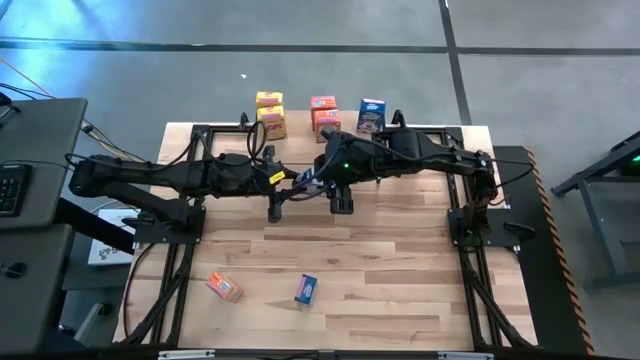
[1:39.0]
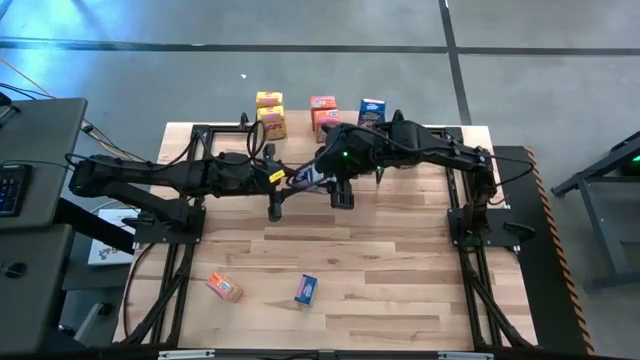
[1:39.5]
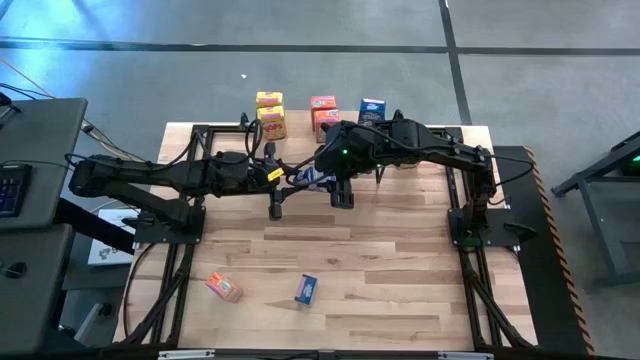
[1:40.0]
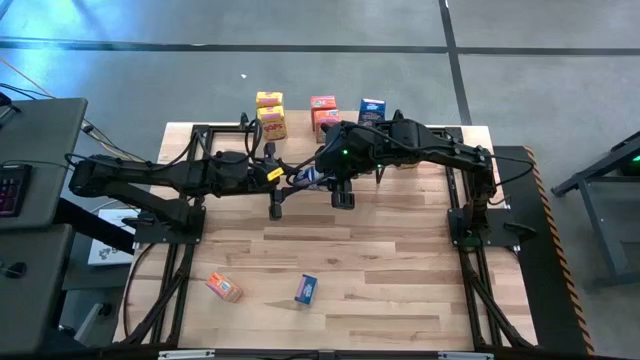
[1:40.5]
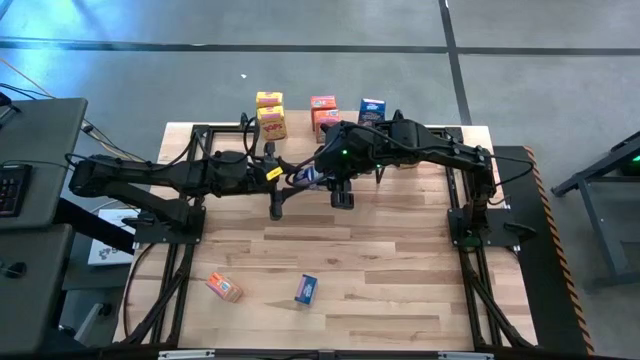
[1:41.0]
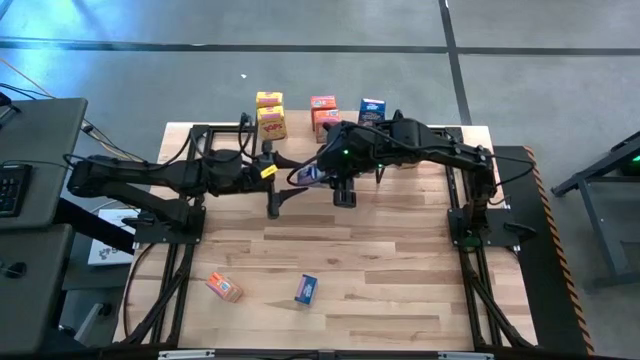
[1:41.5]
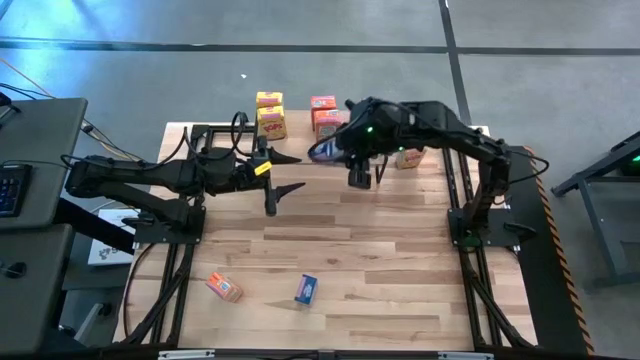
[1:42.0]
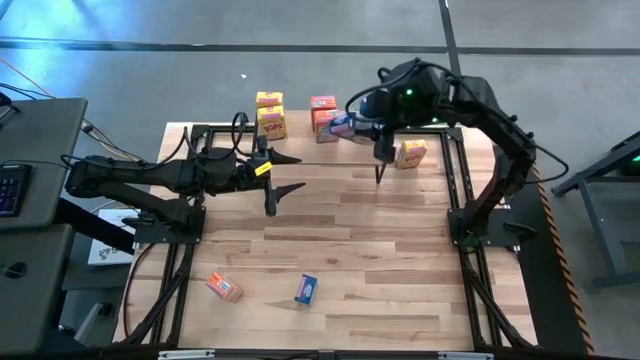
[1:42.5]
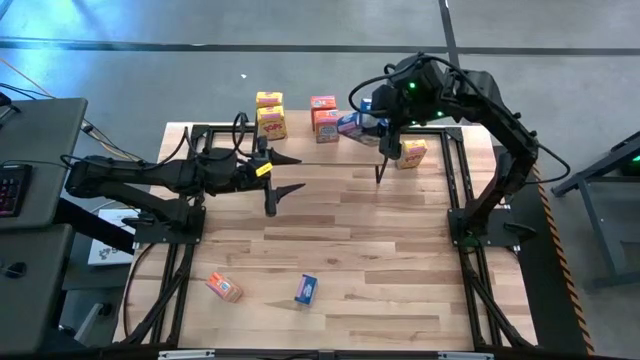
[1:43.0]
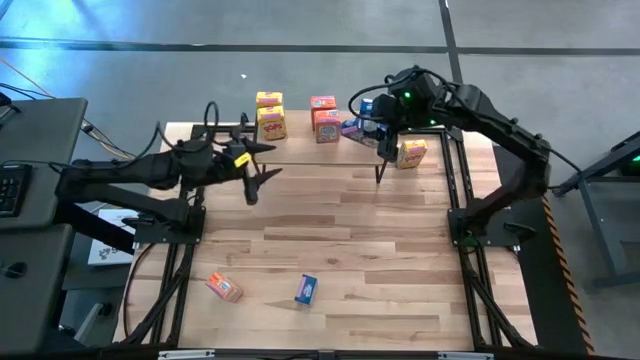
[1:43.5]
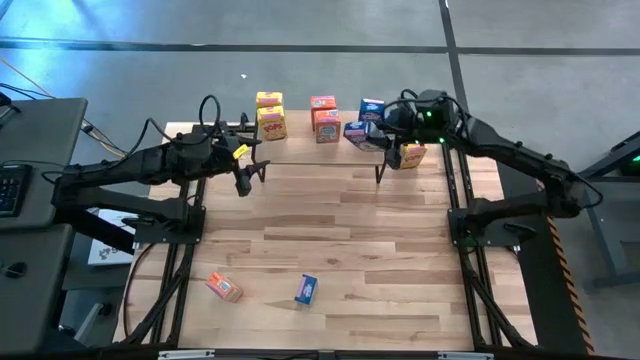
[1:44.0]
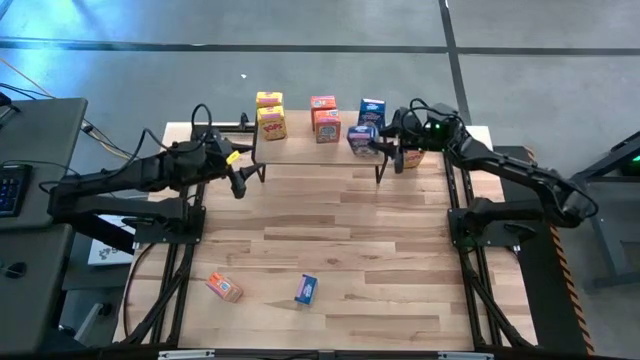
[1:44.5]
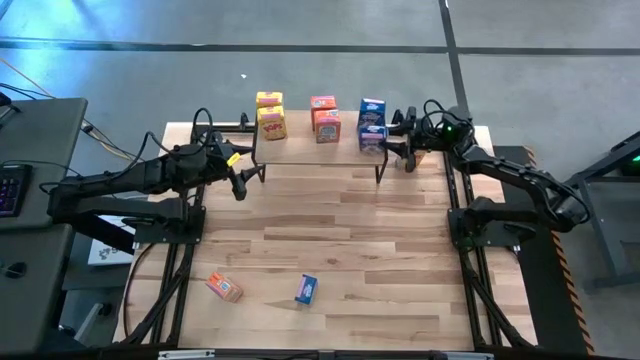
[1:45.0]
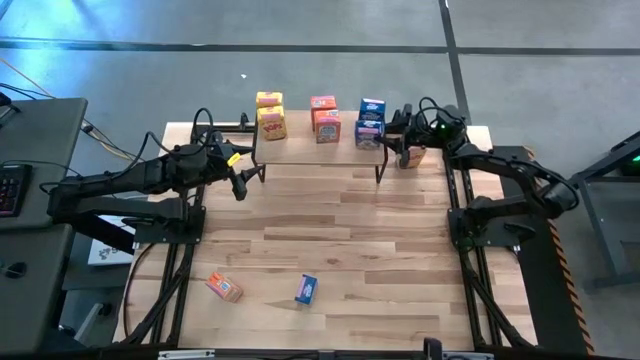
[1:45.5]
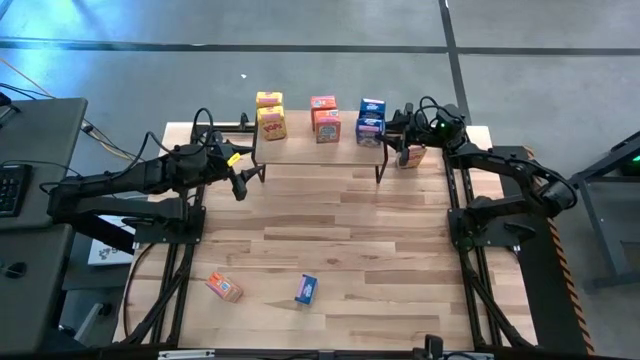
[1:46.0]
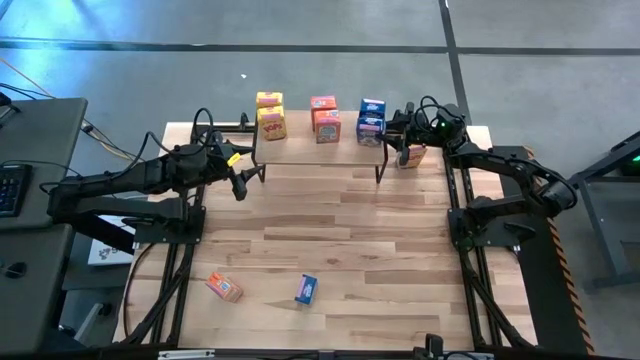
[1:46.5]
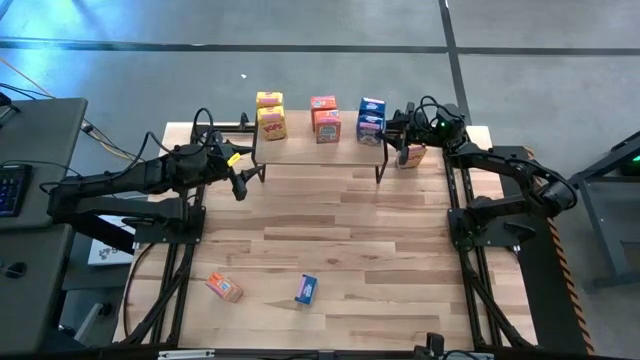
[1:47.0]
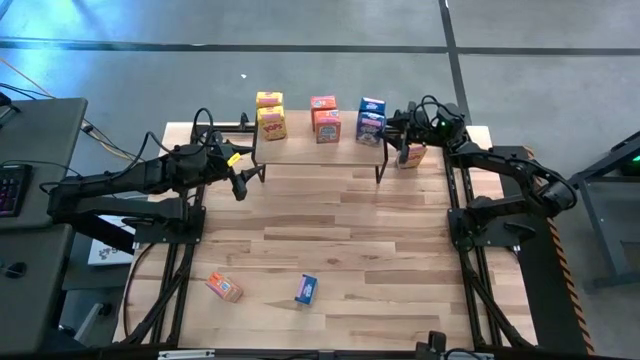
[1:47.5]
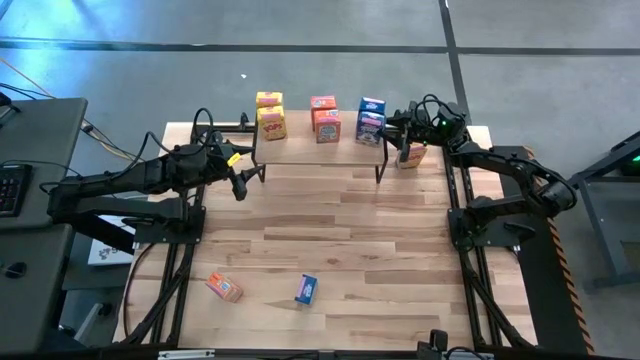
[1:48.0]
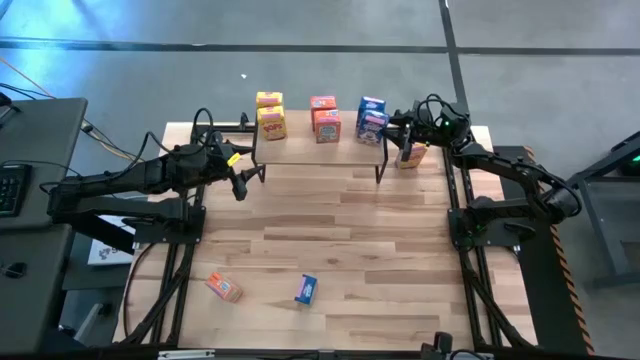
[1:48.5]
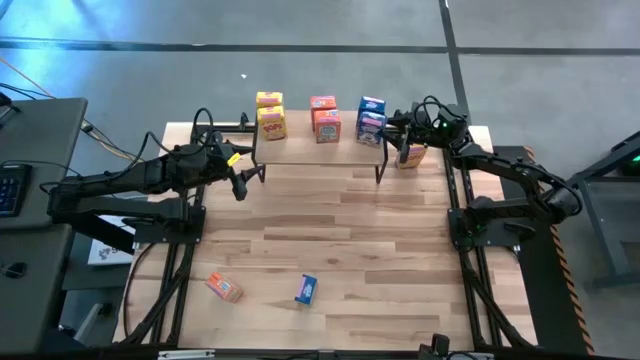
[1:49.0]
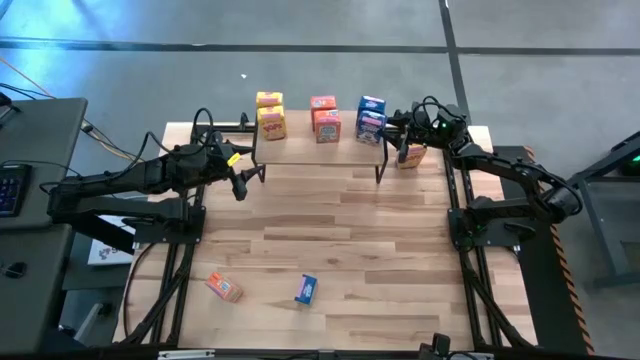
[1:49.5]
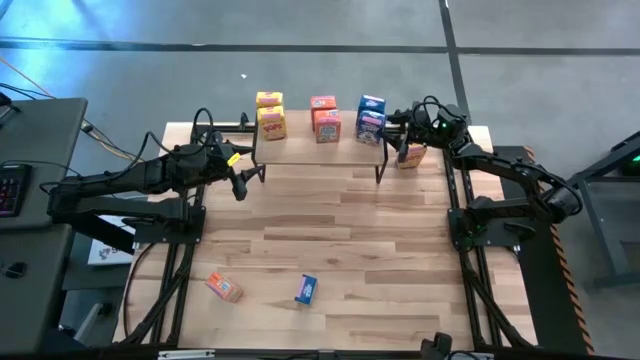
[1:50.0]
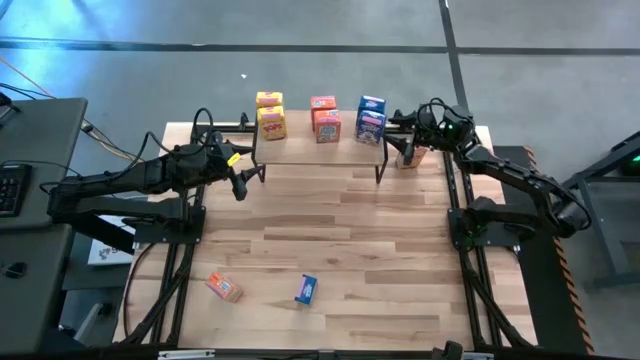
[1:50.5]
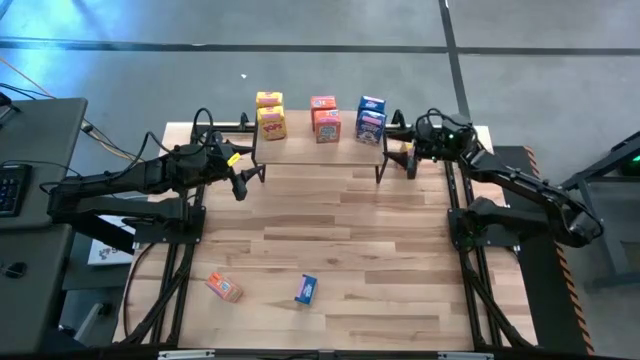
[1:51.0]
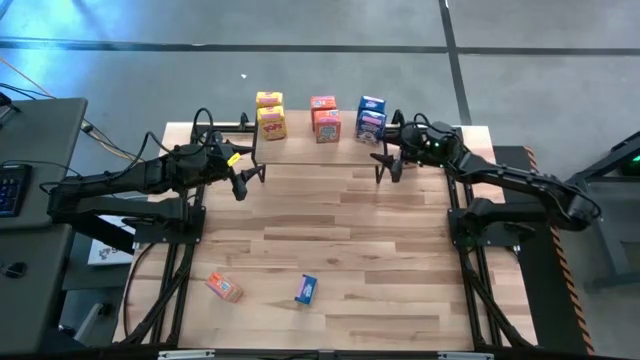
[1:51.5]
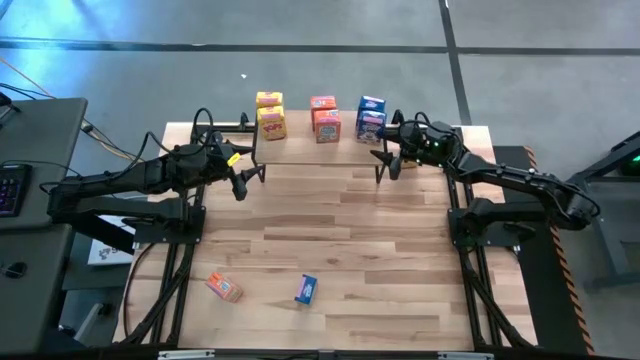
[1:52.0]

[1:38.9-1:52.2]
Task: Stack cereal on shelf
Put the top blue cereal box aligned with the other blue cereal box on the shelf

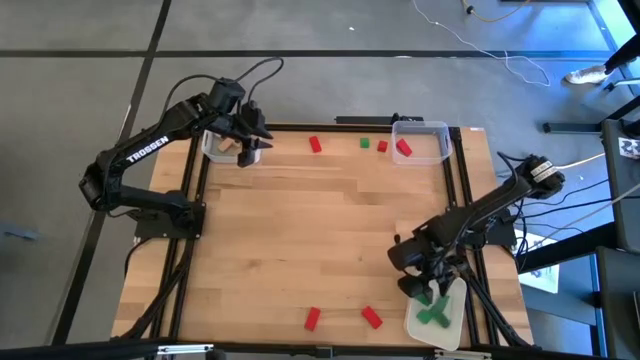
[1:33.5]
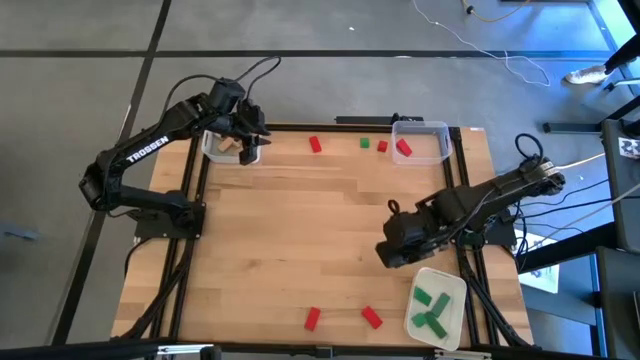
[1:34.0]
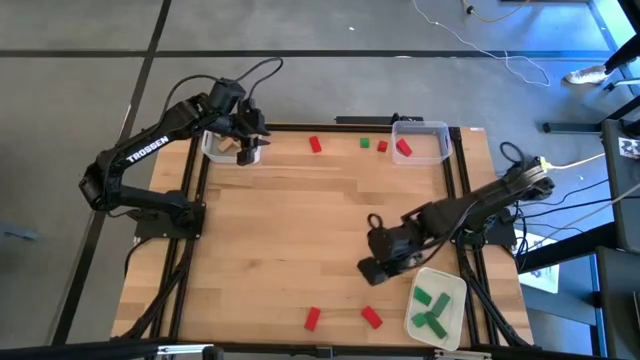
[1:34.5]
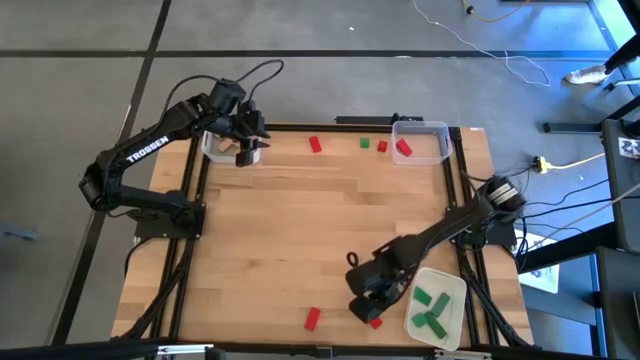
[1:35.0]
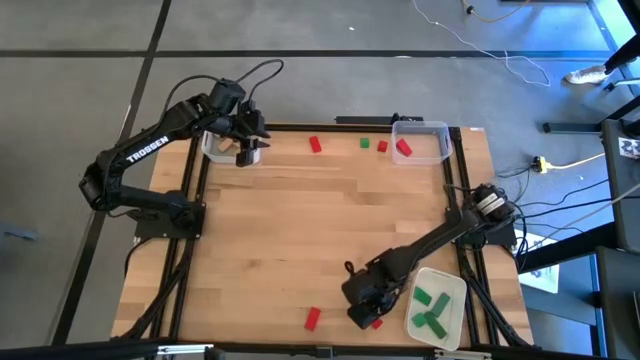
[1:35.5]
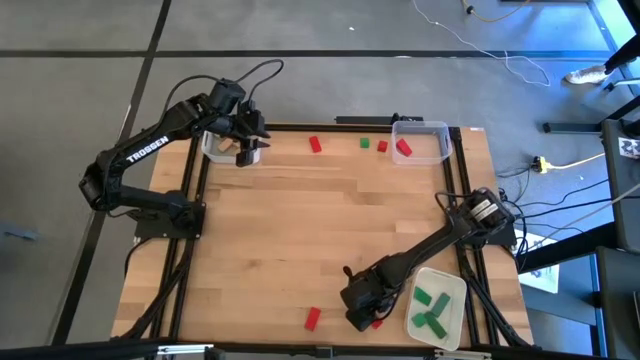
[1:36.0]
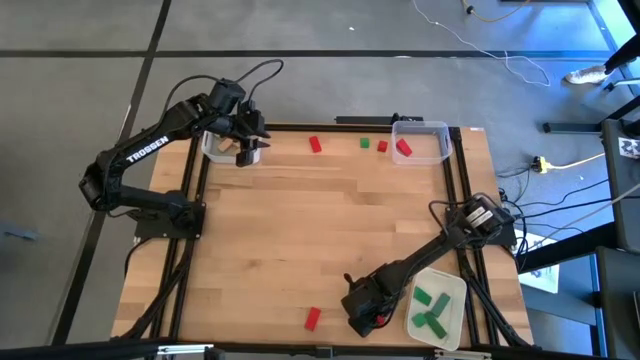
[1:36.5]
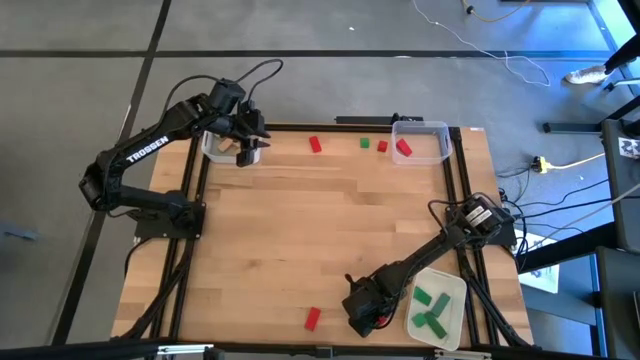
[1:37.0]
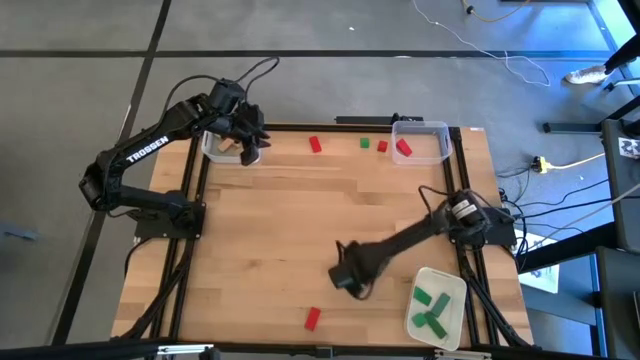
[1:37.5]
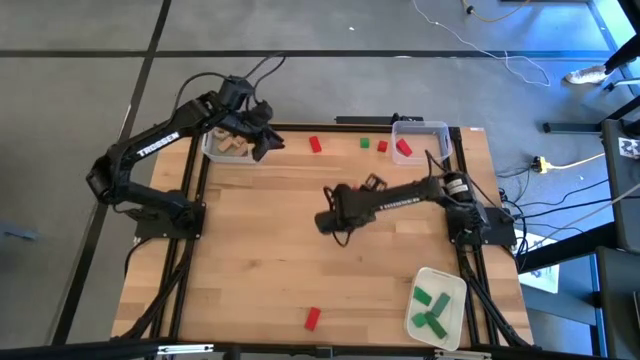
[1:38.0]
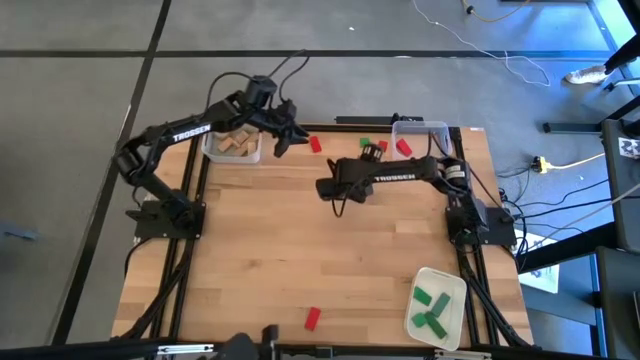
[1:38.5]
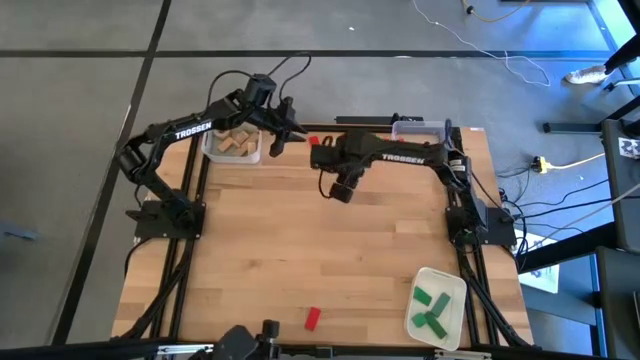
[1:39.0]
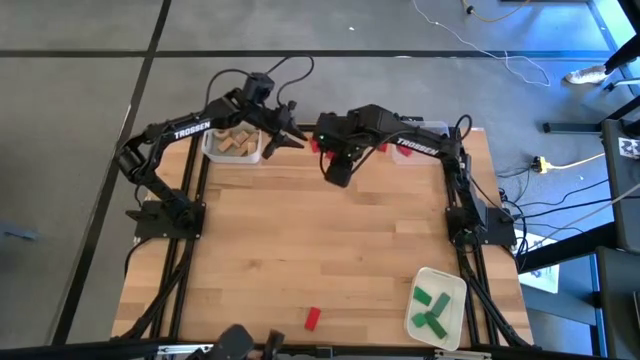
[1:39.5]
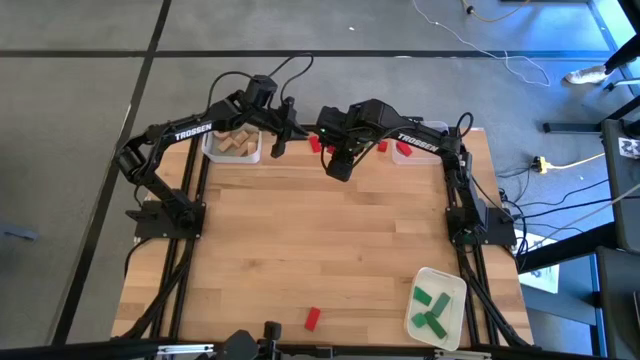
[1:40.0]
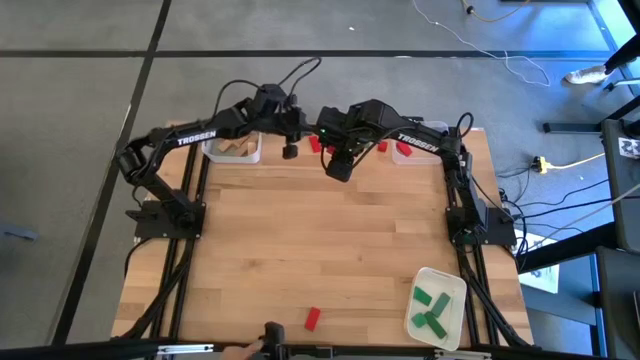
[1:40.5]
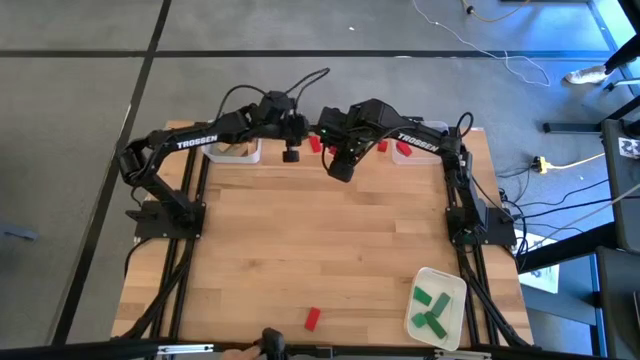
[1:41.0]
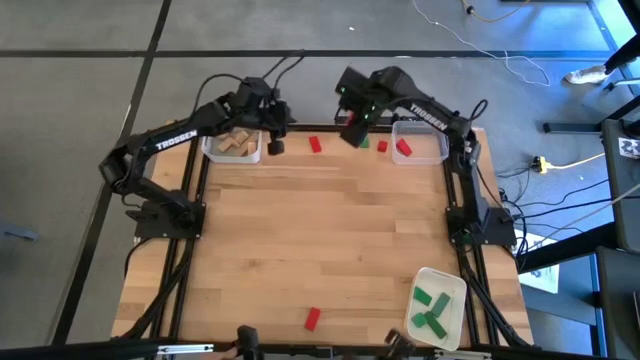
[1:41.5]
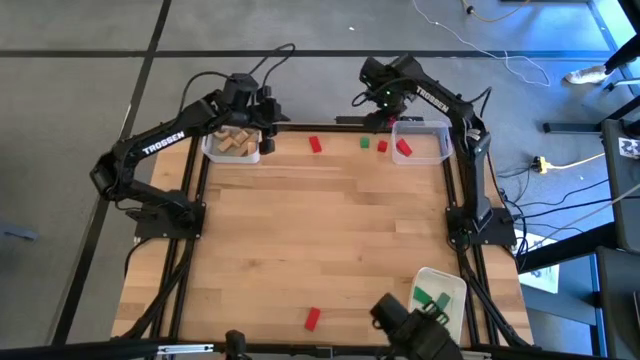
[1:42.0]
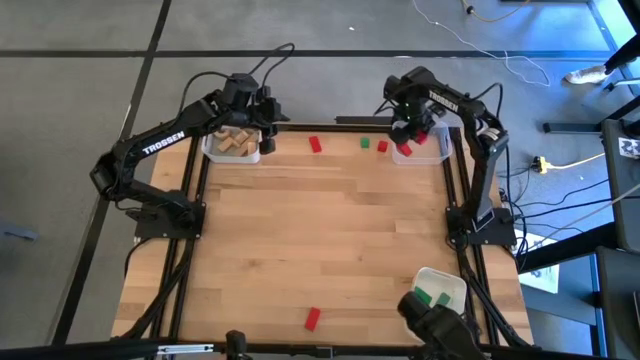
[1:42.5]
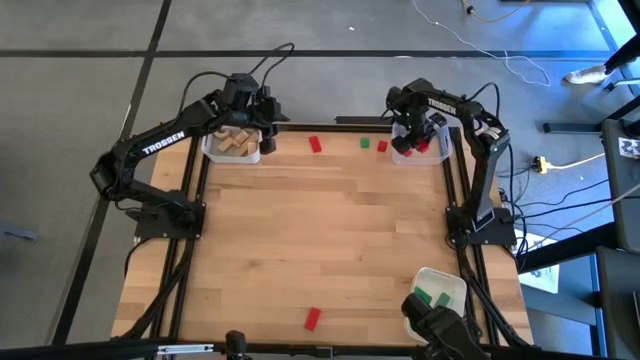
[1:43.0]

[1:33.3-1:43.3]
Task: Sort & place blocks by color
Put the red block into the transparent bin
